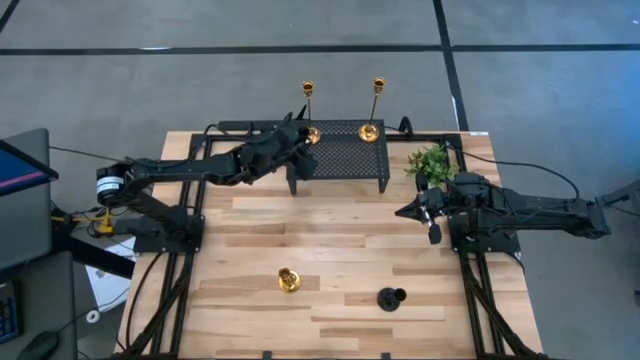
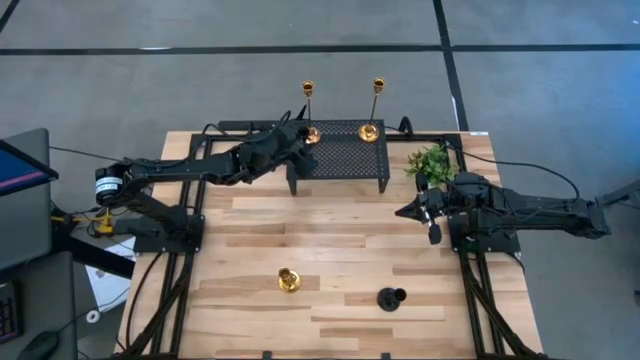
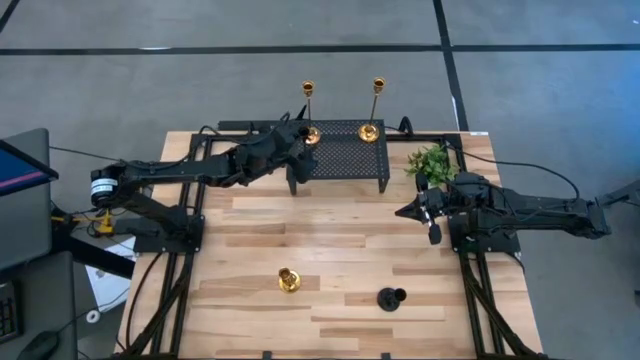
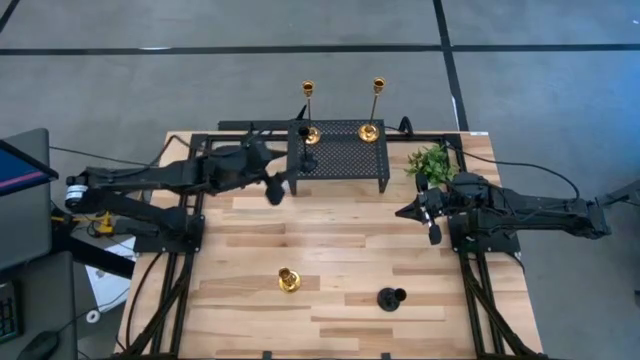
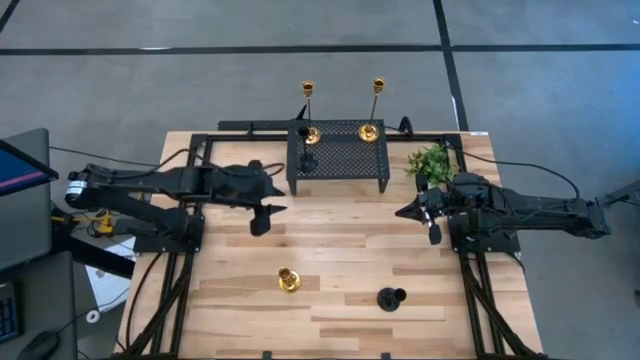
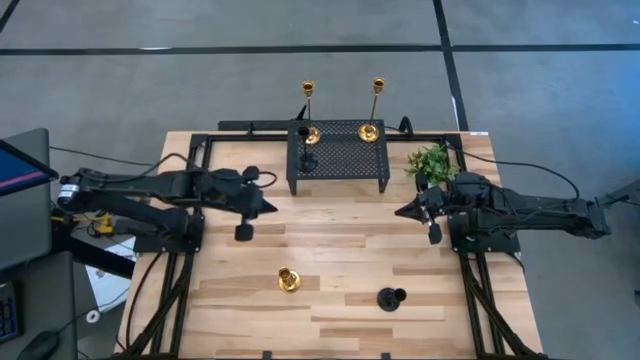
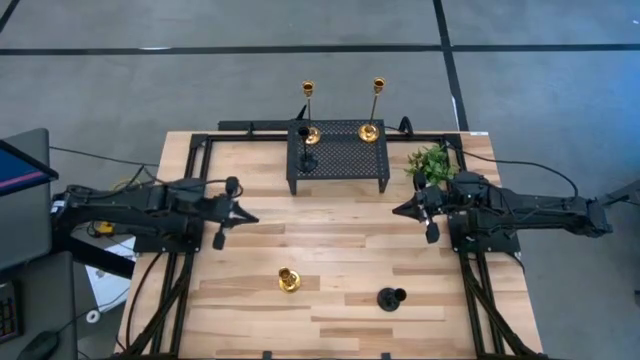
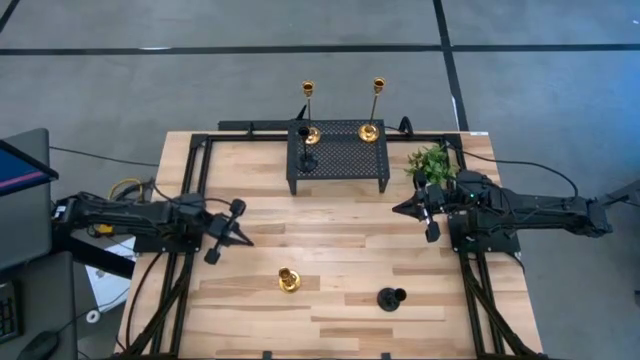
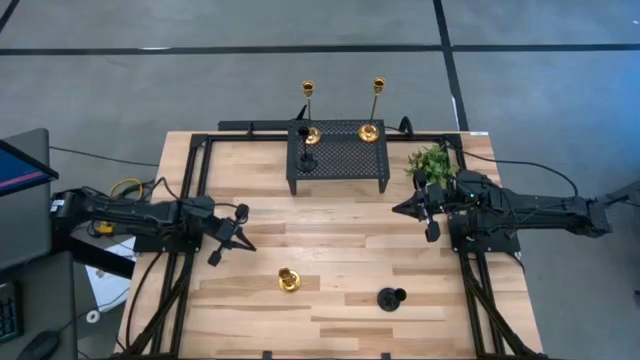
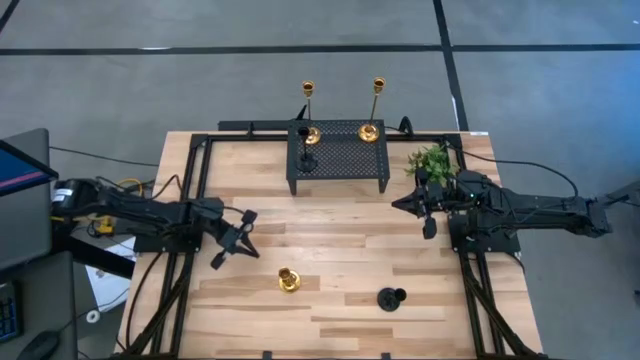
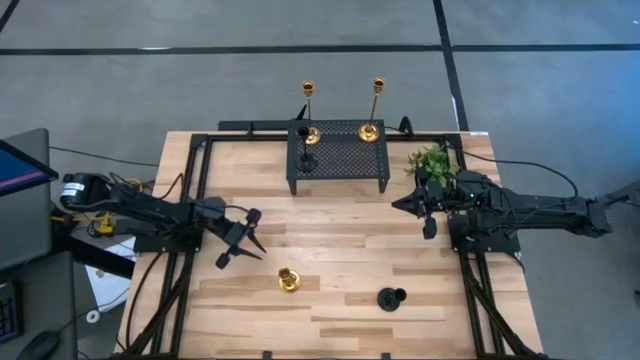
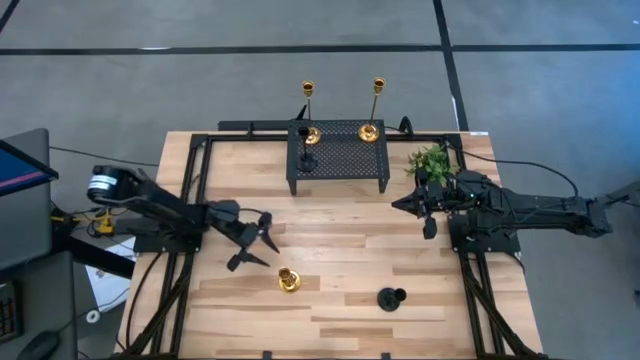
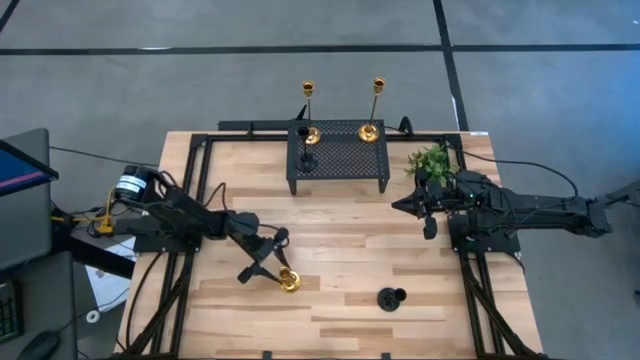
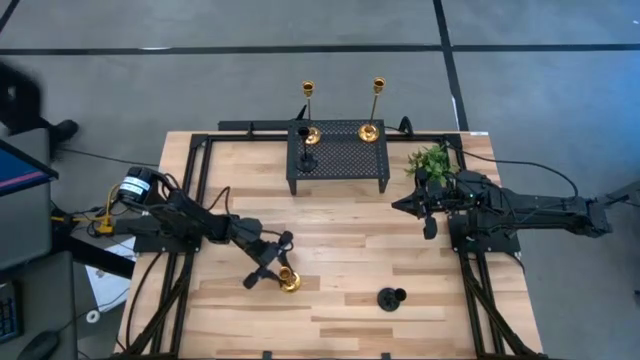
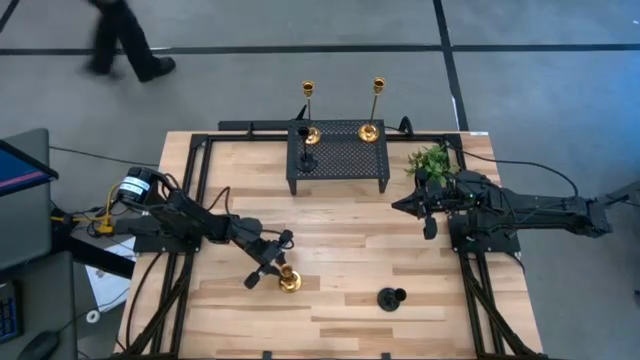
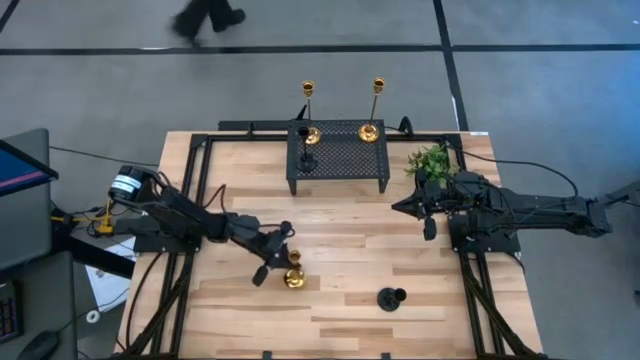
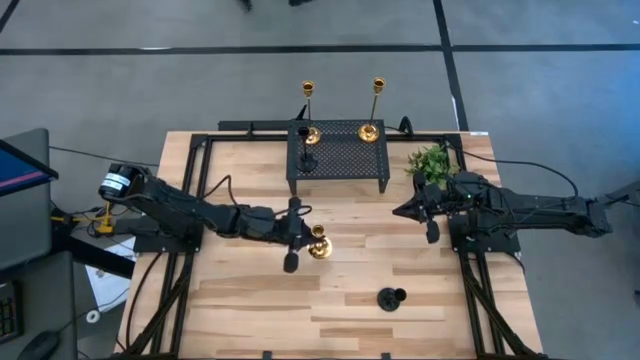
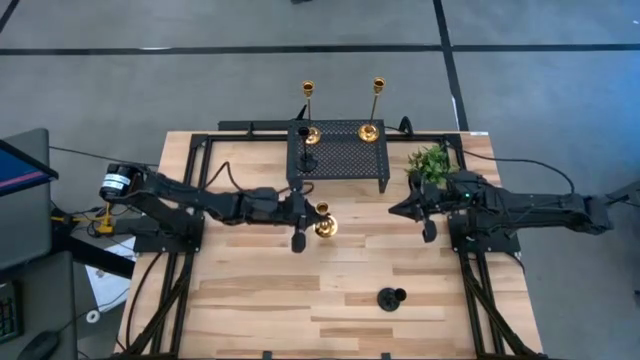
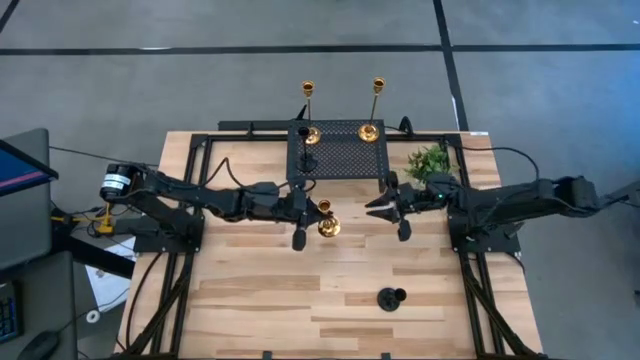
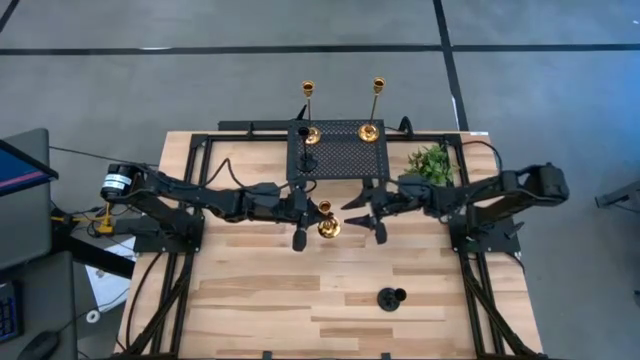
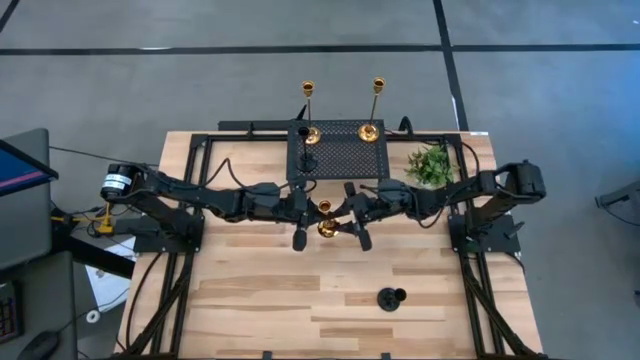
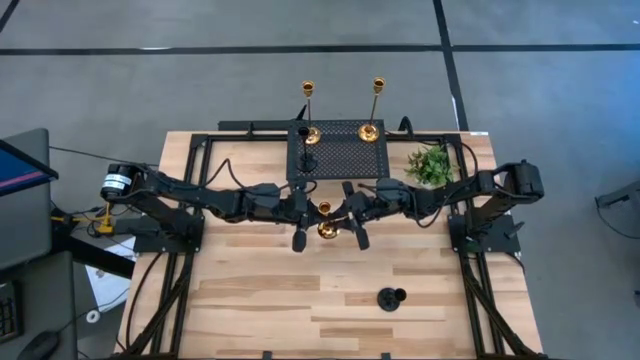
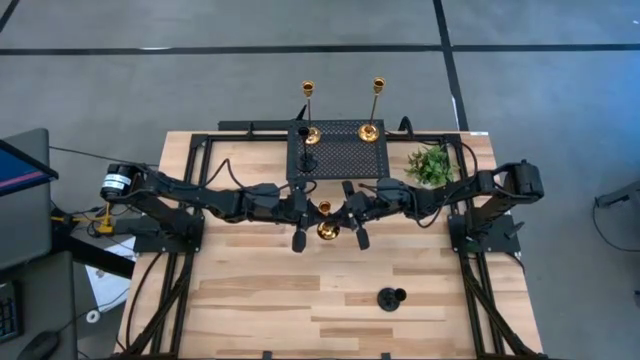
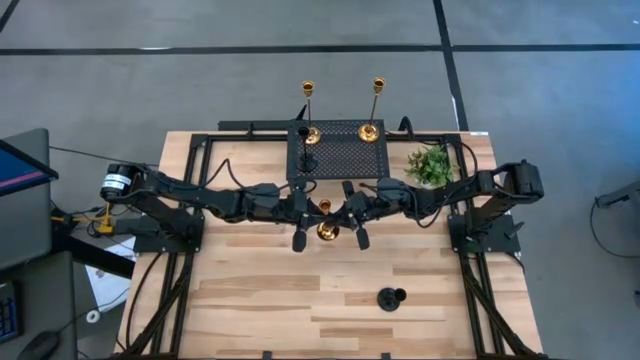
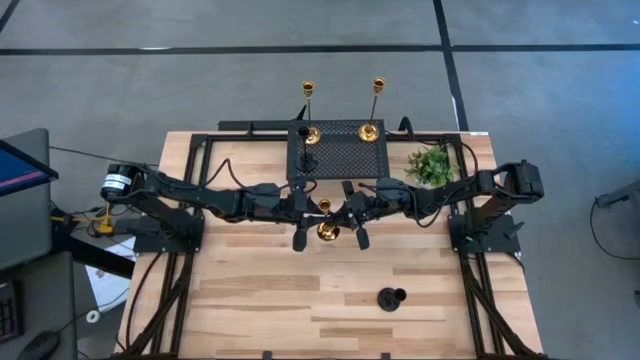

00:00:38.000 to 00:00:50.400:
Task: Pick & Place candle stick holders
Put the gold candle holder on the shelf

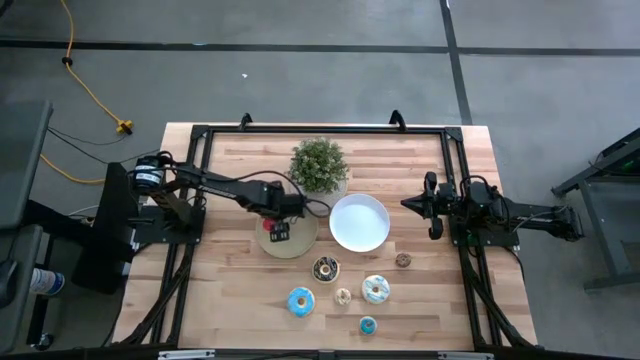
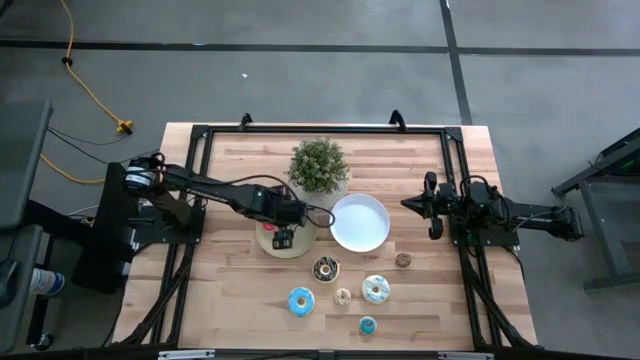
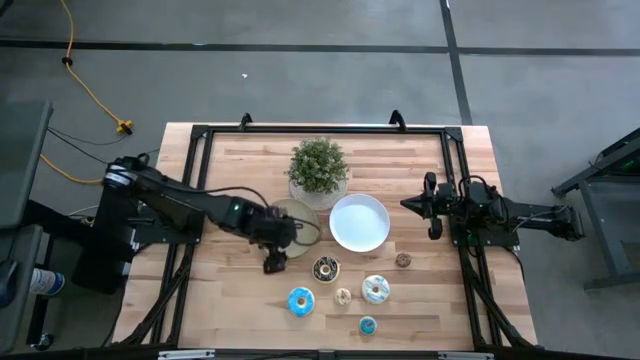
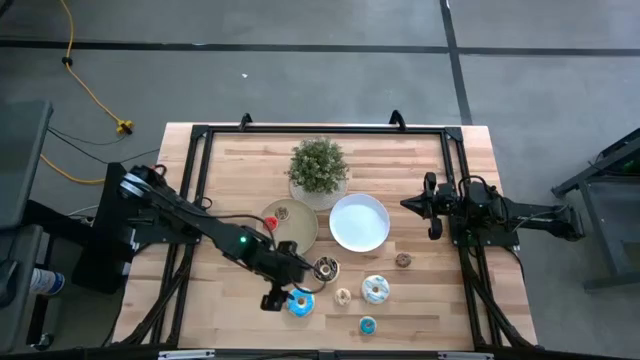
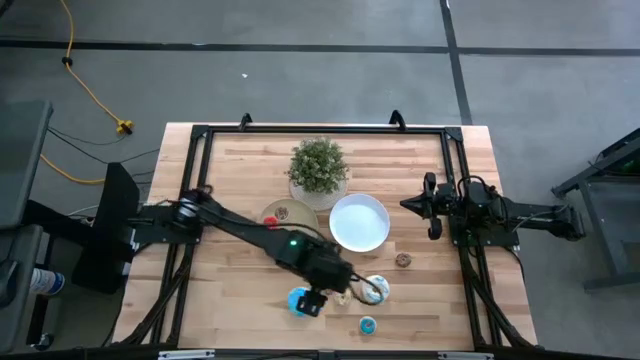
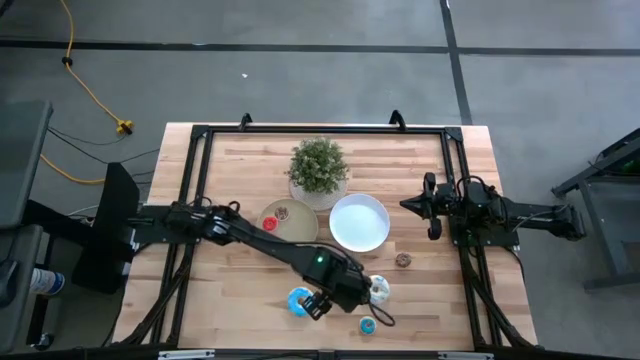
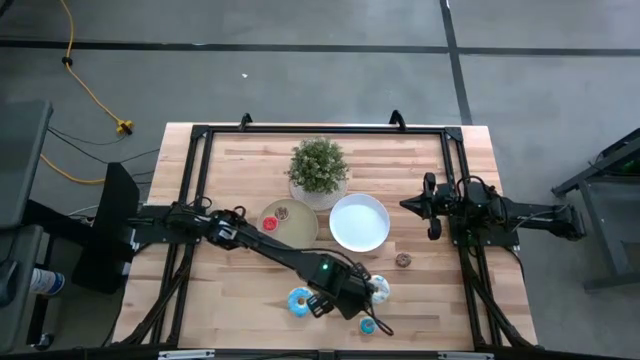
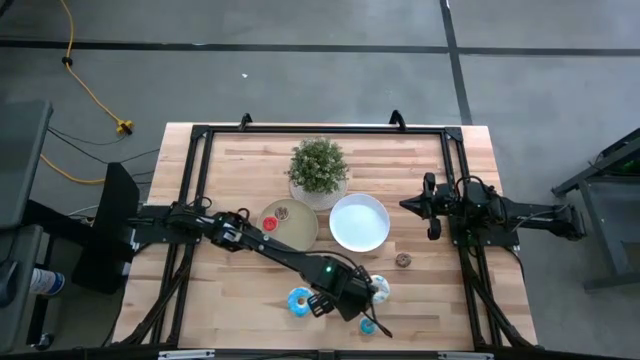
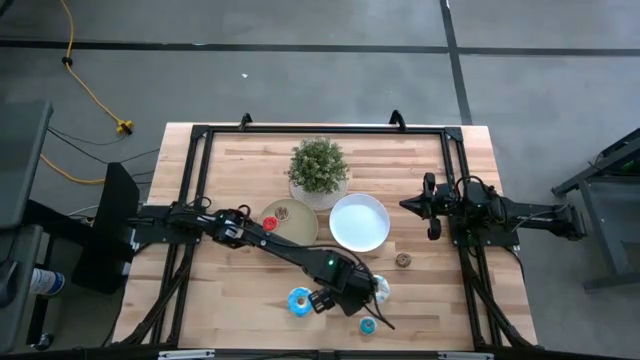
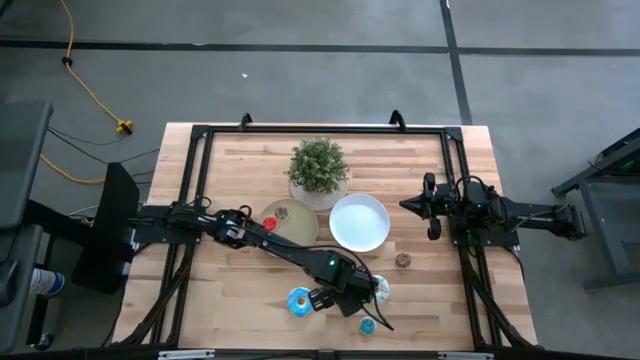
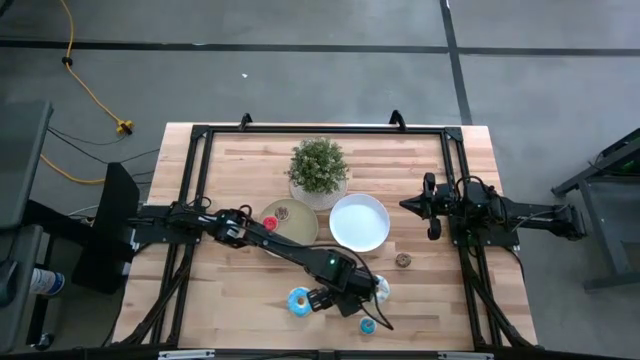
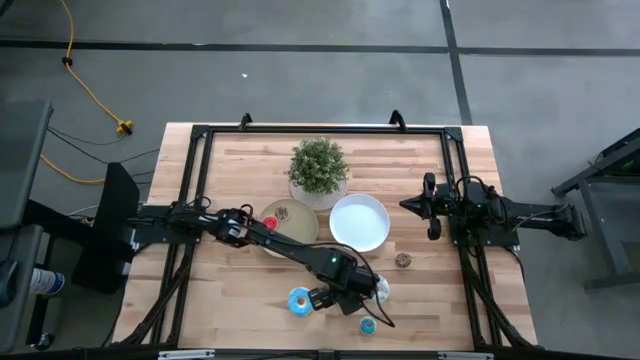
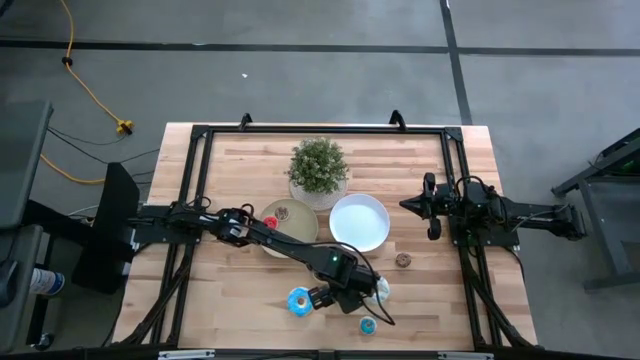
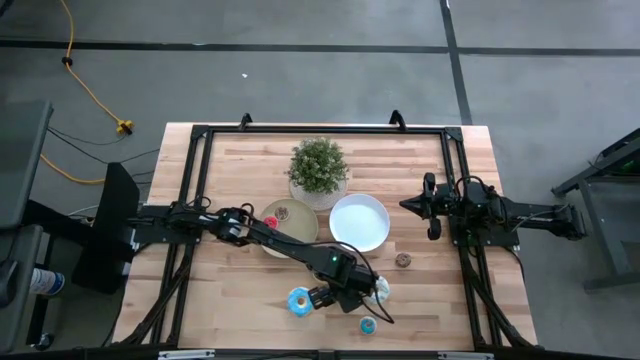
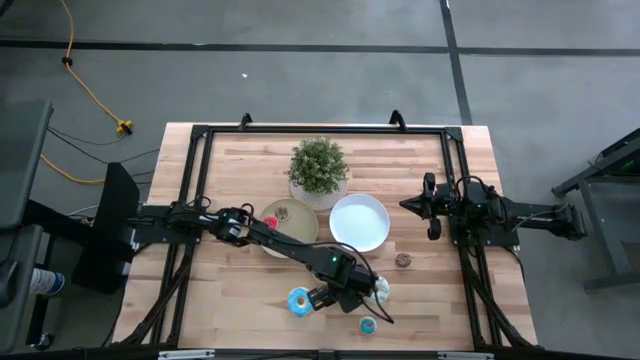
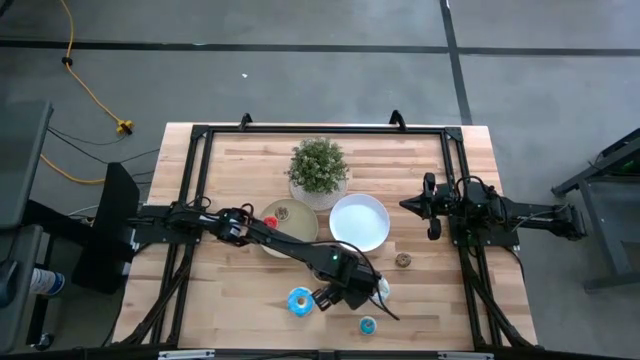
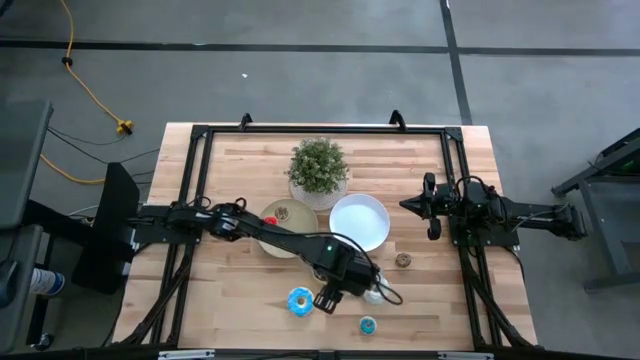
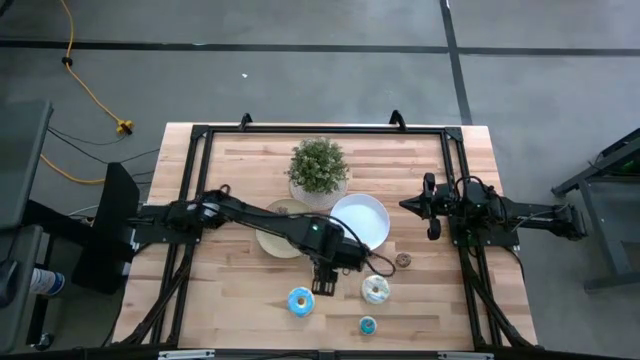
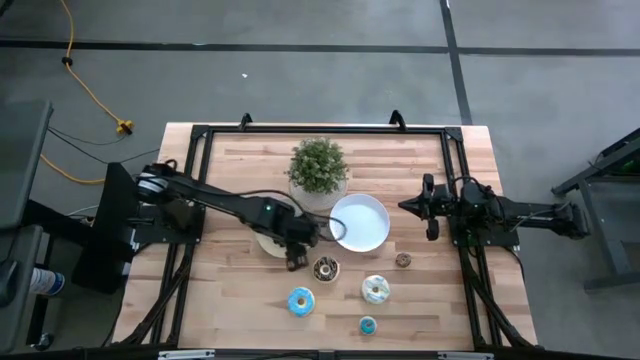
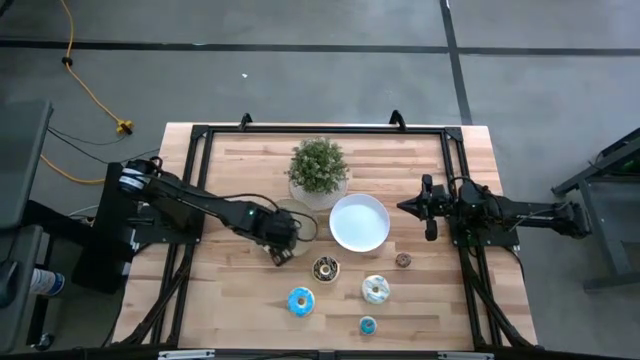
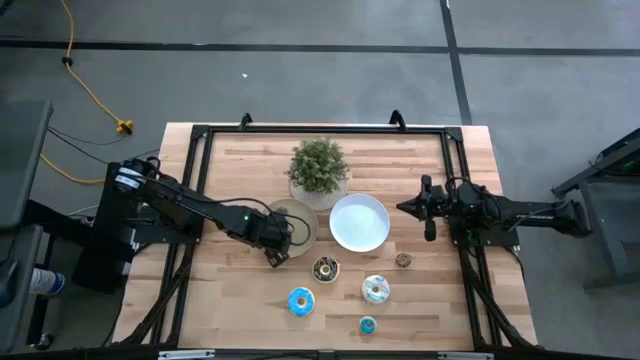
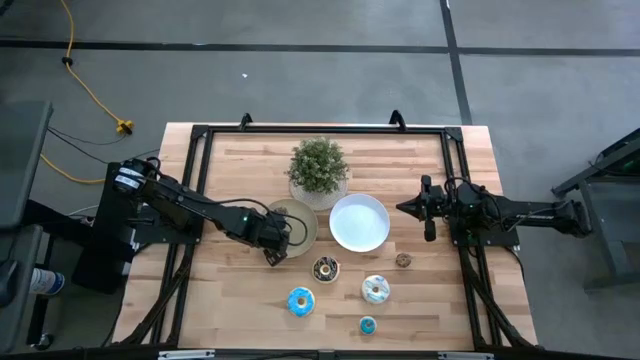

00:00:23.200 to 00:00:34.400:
Task: Pick & Place donuts
Put the small white donut on the brown plate
